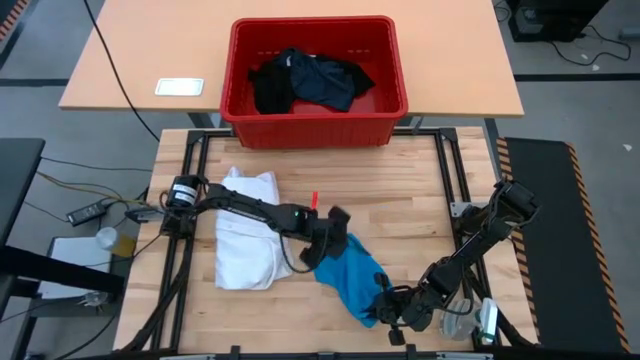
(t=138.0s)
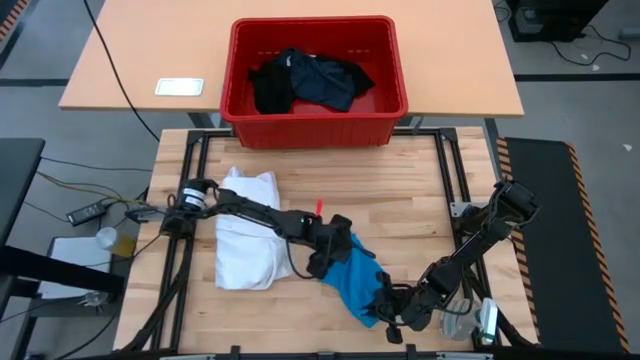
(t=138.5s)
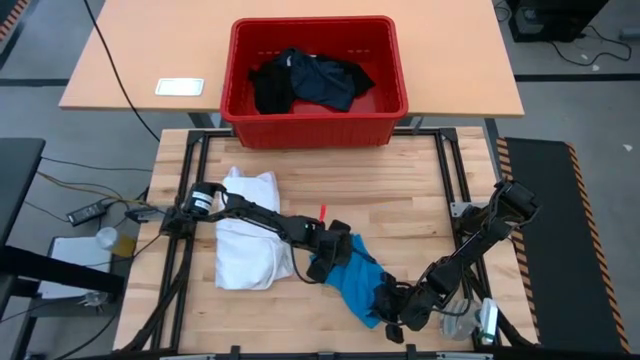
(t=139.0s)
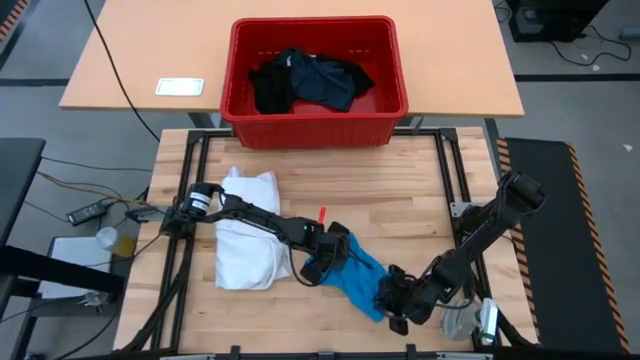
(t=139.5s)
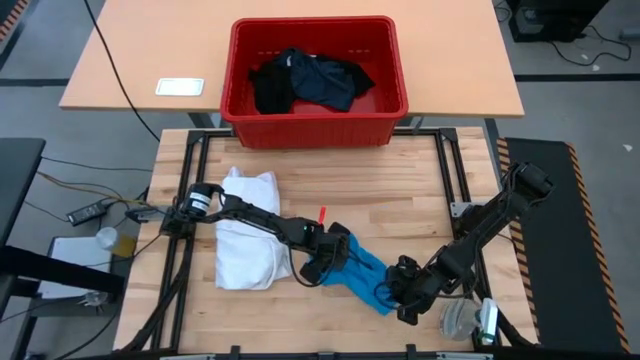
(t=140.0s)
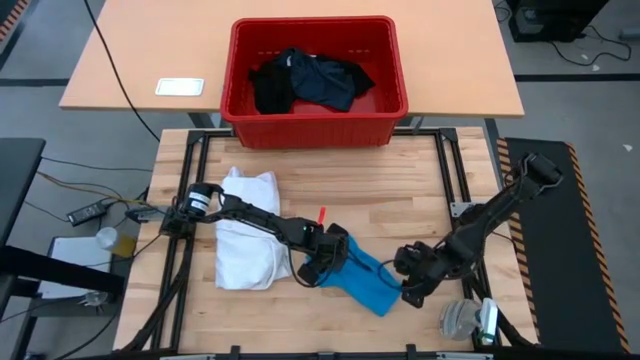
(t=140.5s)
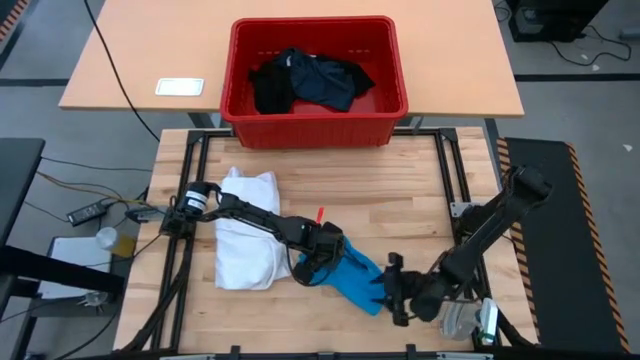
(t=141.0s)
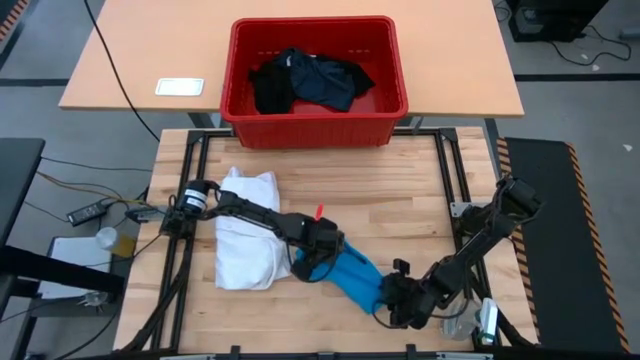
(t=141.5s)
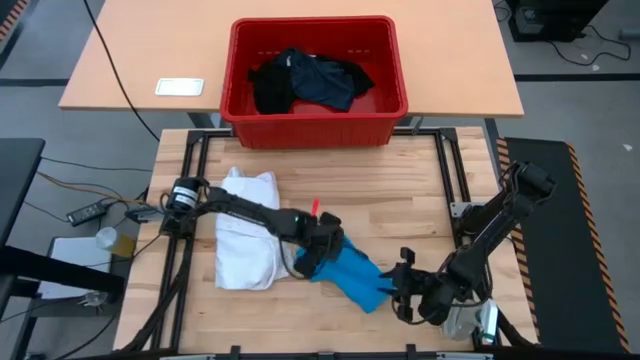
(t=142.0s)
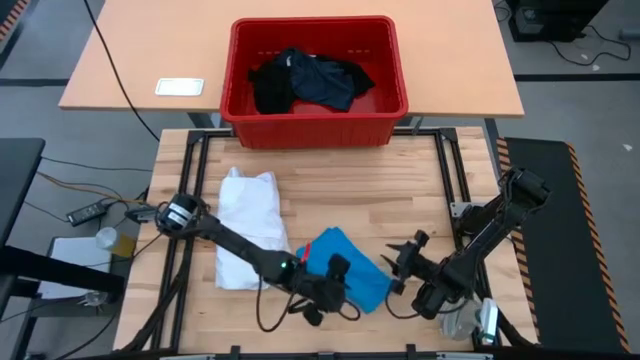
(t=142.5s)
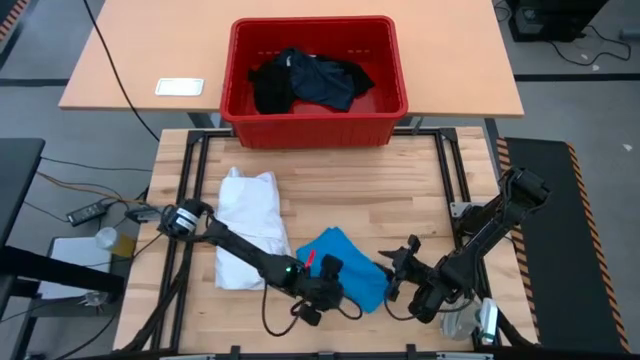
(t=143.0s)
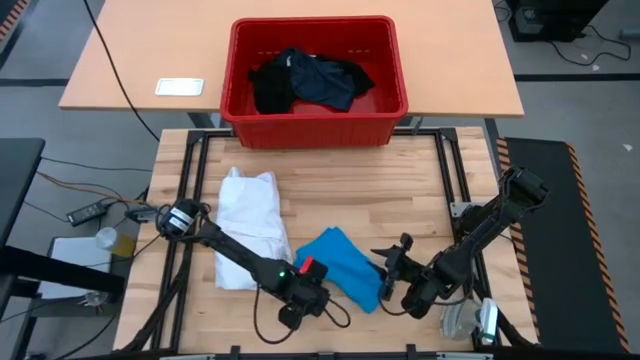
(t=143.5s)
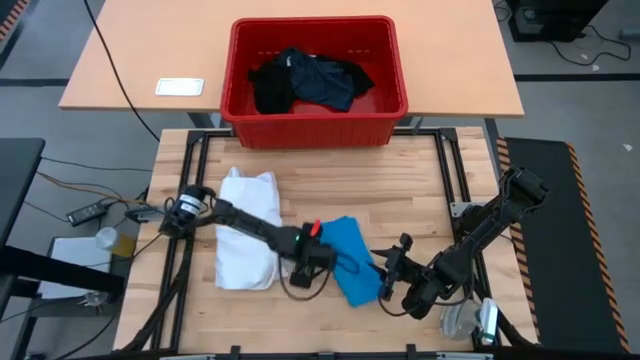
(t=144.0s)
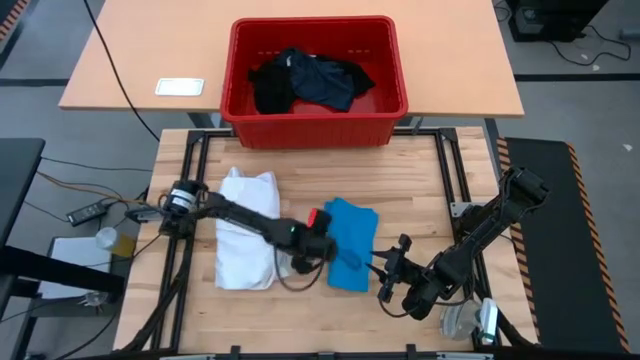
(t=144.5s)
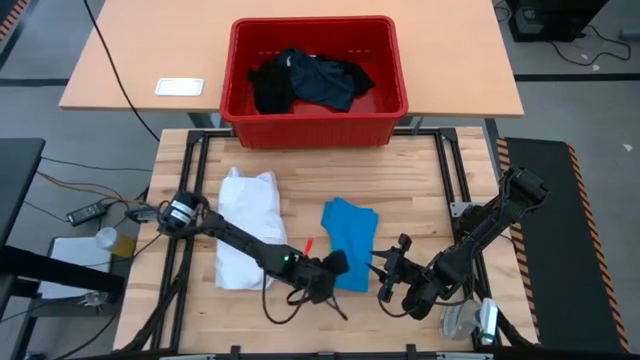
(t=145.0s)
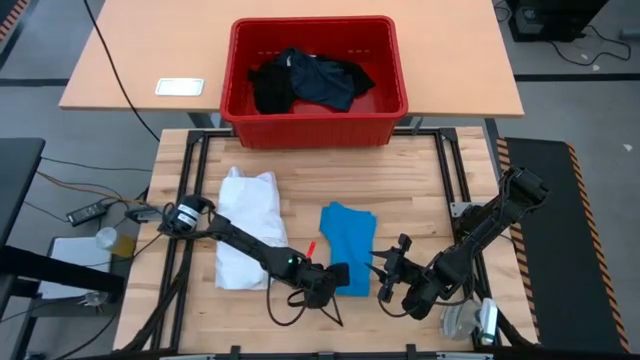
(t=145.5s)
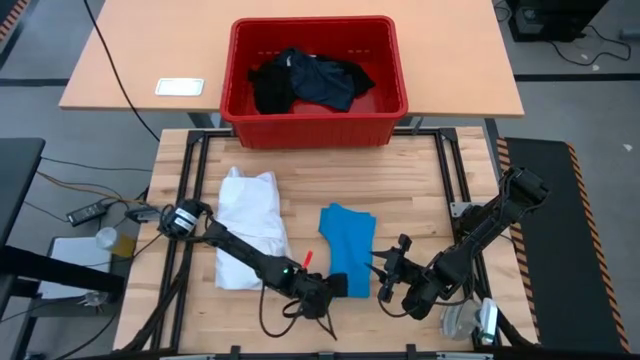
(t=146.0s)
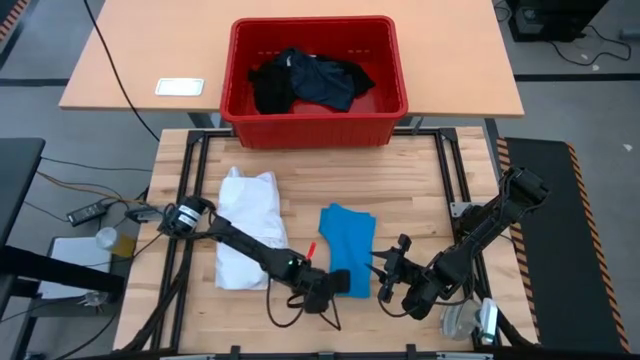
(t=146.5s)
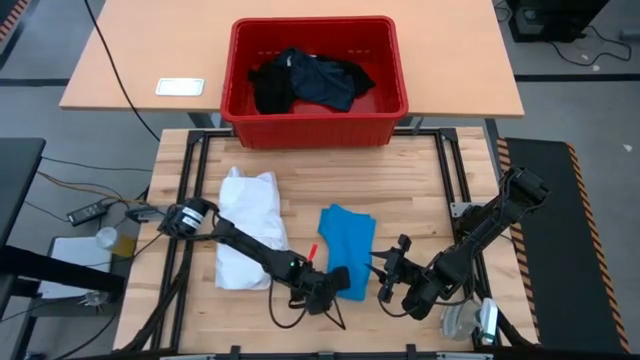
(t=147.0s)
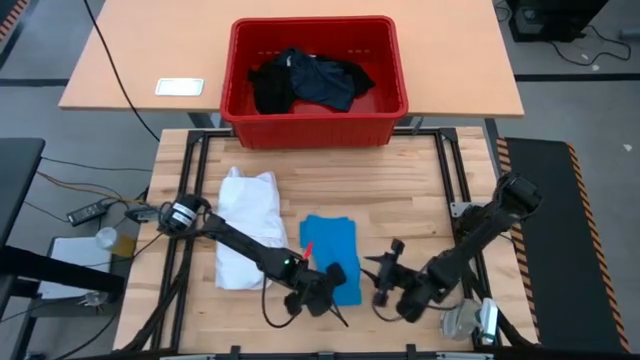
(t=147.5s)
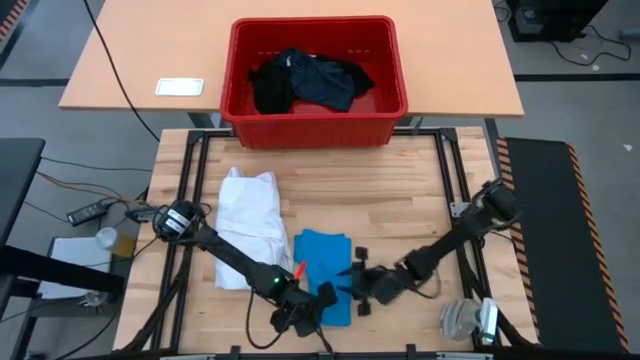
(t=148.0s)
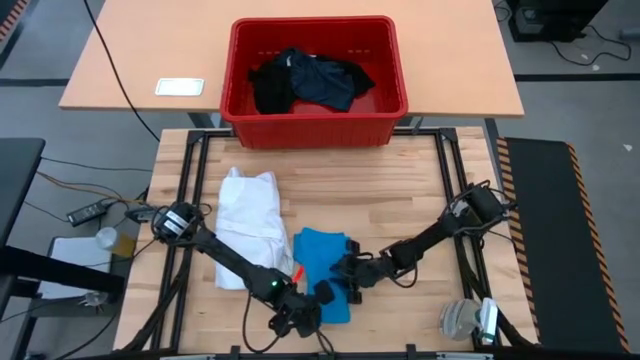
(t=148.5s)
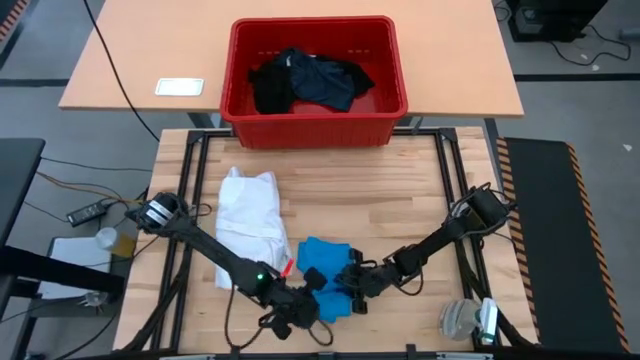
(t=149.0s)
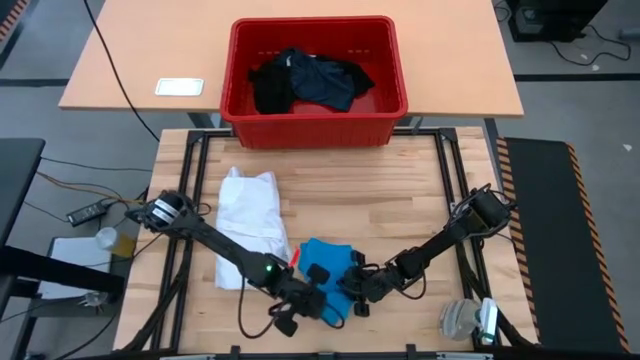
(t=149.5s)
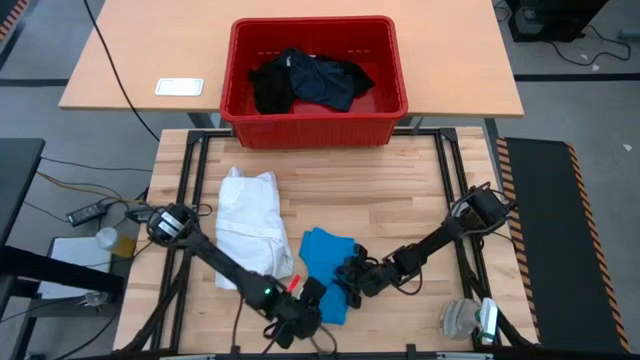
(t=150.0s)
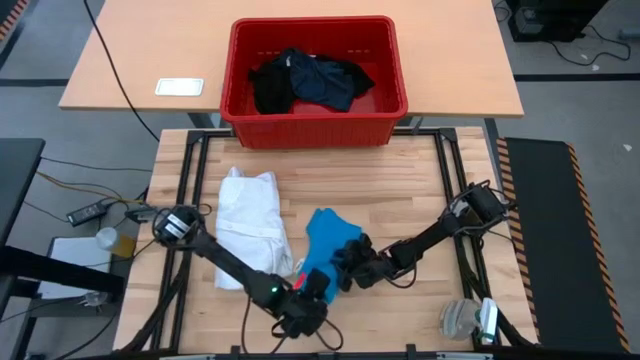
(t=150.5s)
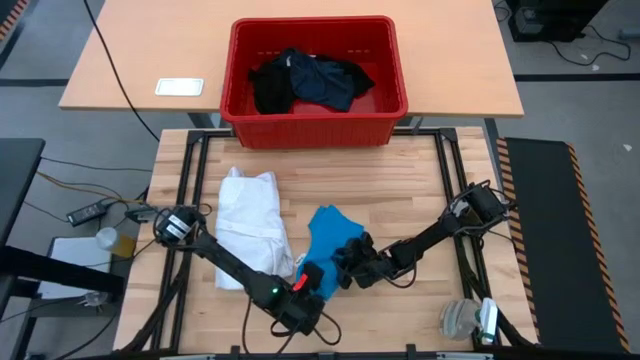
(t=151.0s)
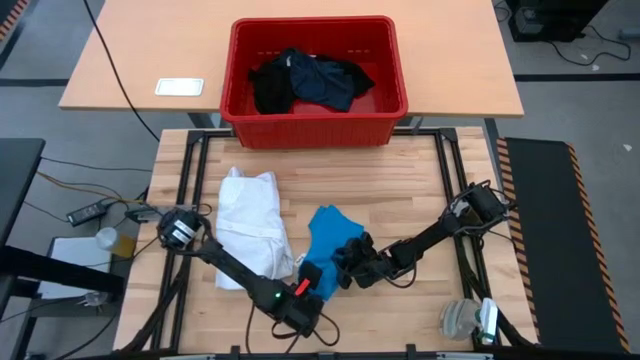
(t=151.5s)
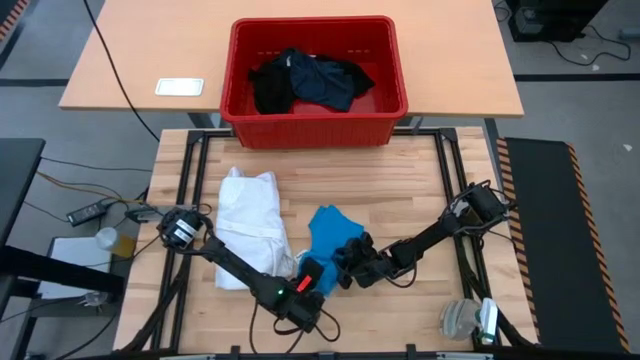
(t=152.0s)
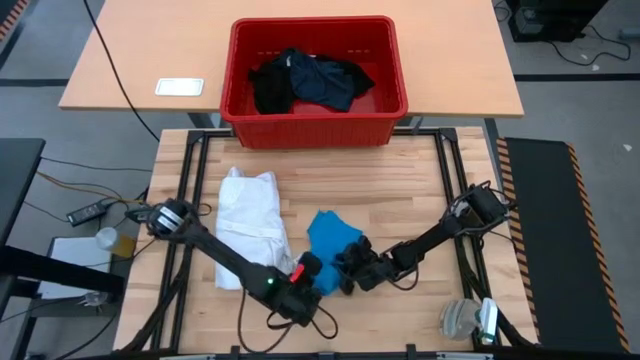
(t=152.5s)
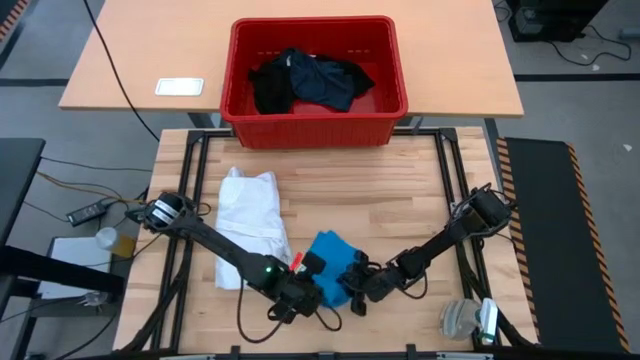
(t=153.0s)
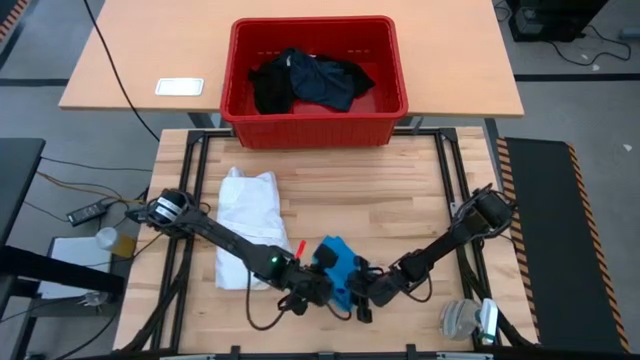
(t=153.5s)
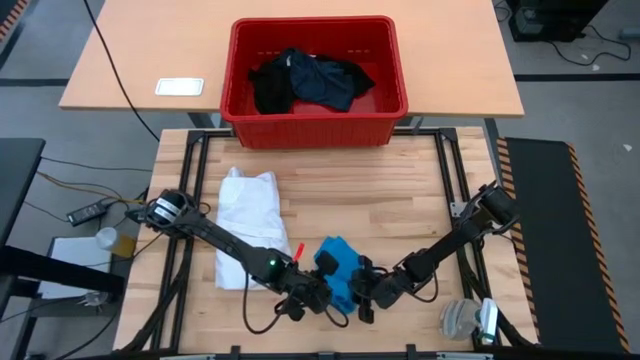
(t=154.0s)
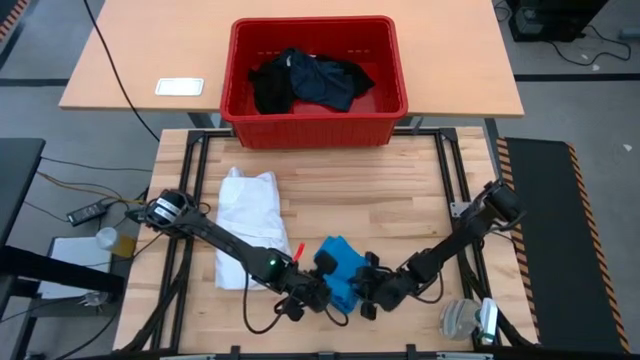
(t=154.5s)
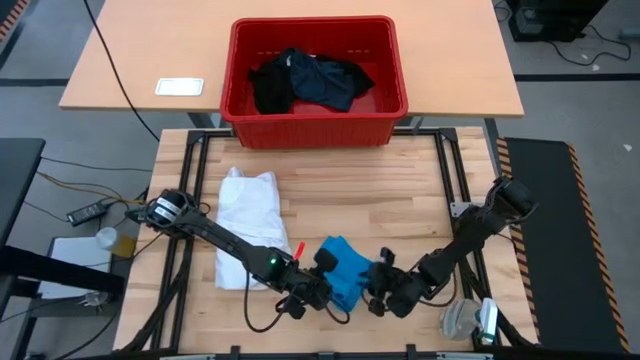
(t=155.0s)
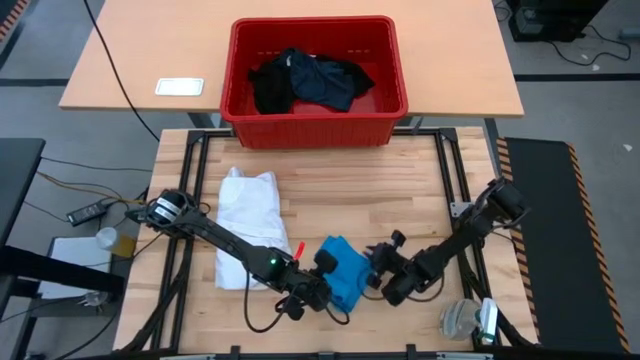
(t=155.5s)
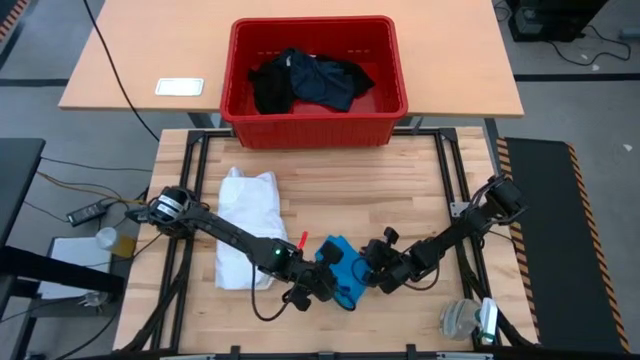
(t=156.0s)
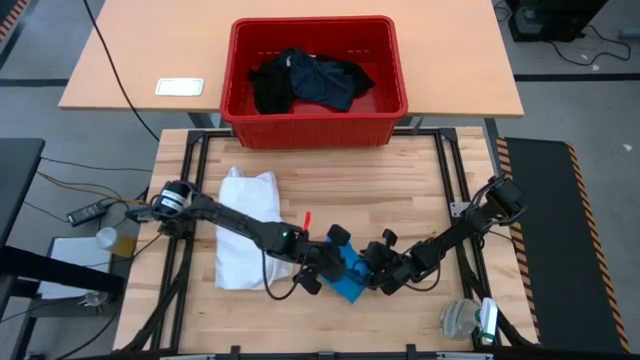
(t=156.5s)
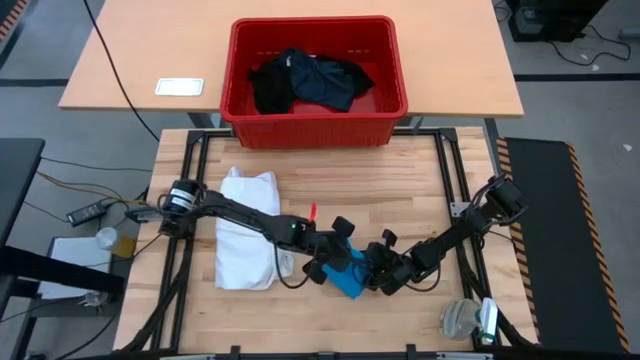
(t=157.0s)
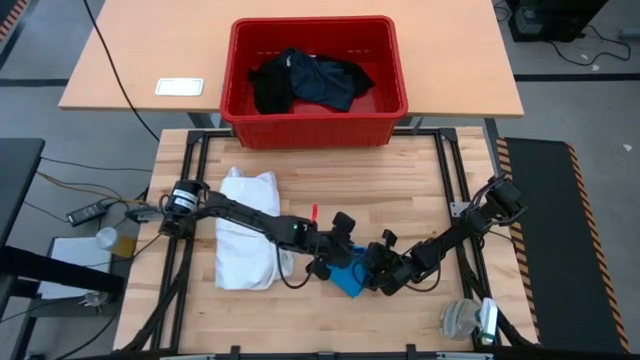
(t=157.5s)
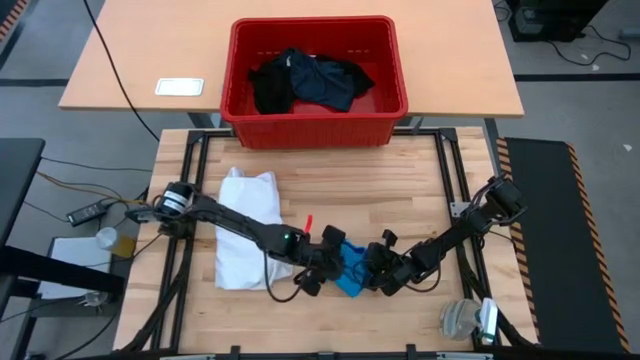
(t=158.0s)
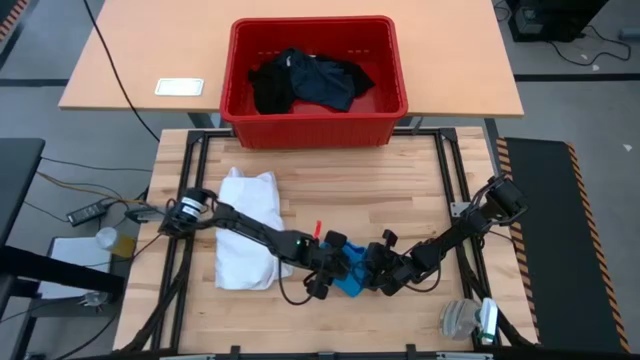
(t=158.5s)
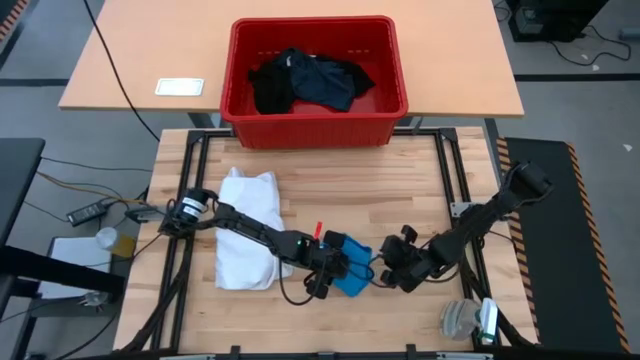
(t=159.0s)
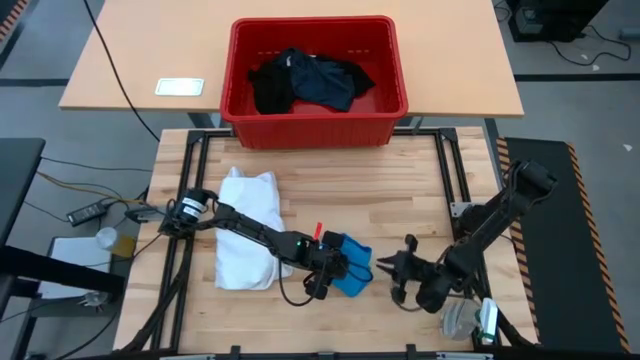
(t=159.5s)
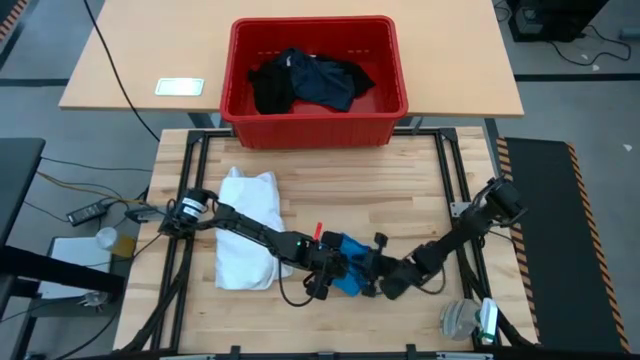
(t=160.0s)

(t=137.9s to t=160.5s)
Task: Fold laundry
Fold the blue underwear
